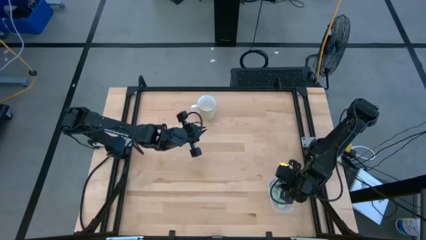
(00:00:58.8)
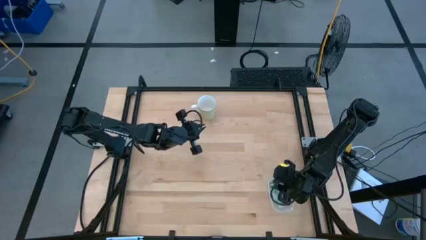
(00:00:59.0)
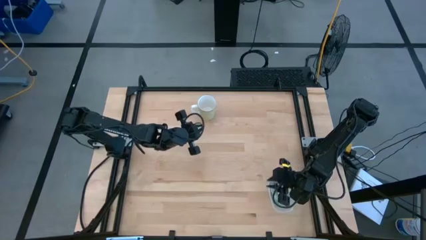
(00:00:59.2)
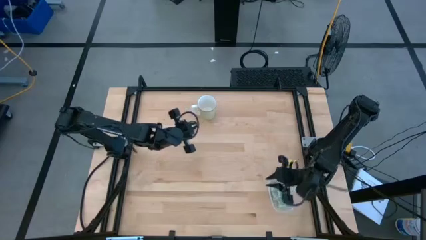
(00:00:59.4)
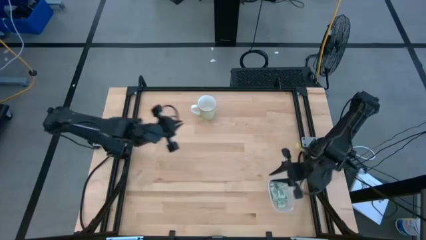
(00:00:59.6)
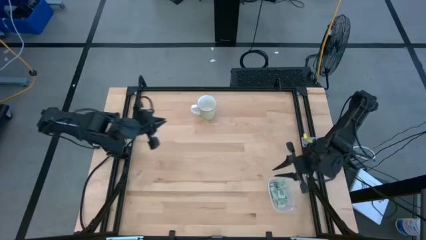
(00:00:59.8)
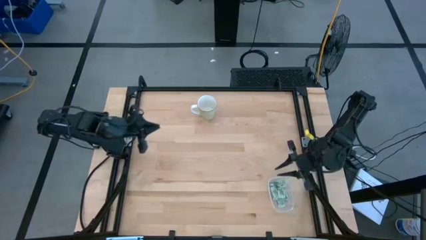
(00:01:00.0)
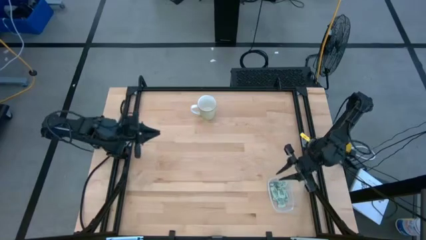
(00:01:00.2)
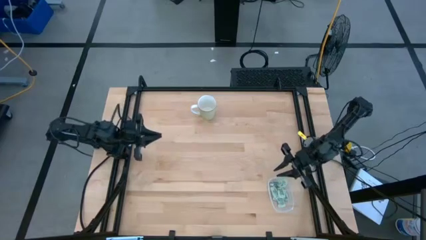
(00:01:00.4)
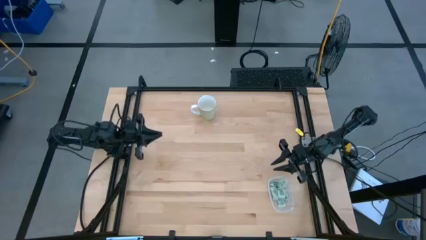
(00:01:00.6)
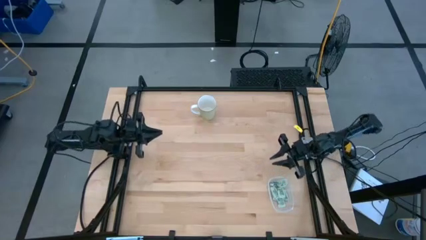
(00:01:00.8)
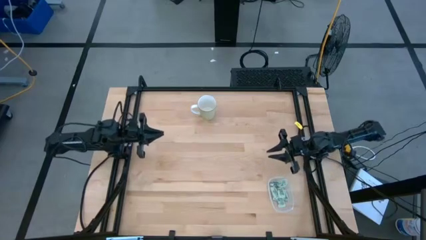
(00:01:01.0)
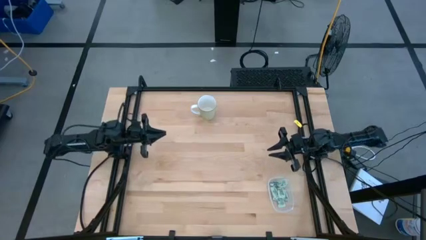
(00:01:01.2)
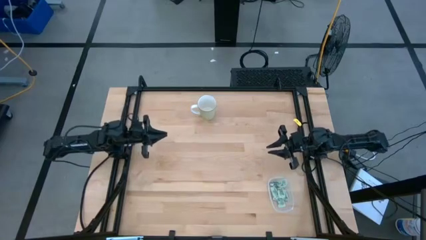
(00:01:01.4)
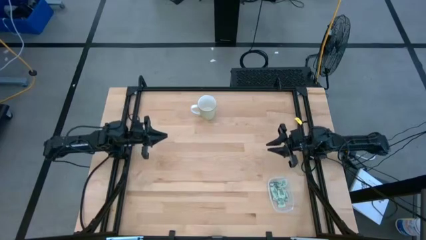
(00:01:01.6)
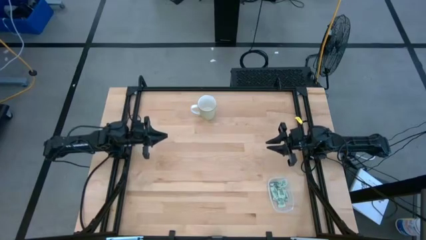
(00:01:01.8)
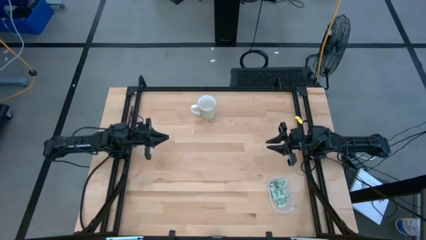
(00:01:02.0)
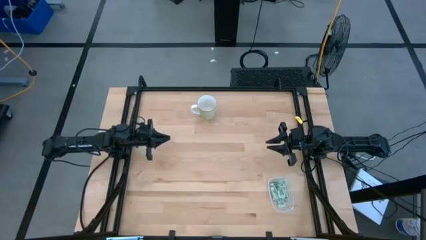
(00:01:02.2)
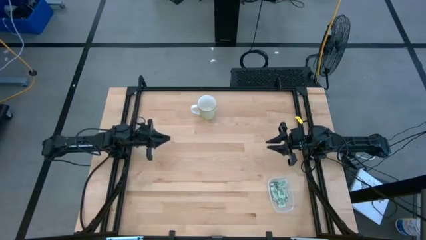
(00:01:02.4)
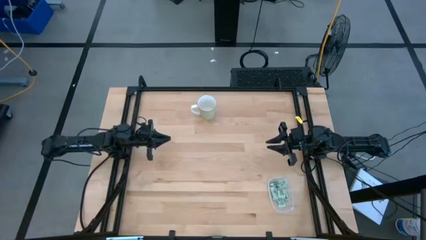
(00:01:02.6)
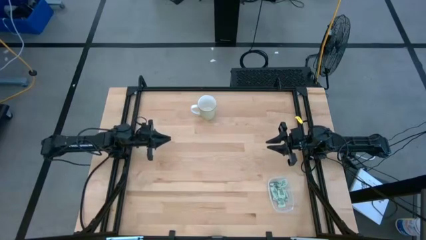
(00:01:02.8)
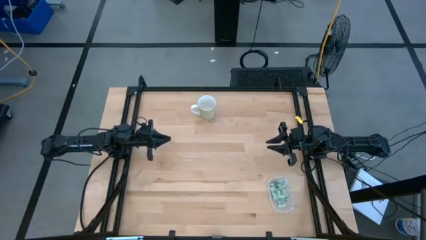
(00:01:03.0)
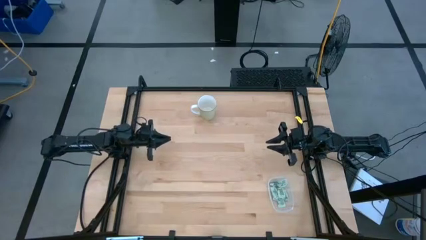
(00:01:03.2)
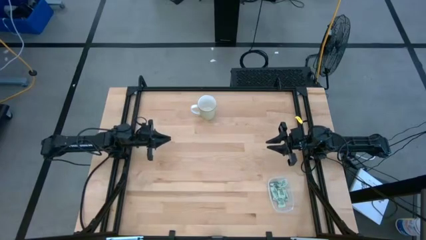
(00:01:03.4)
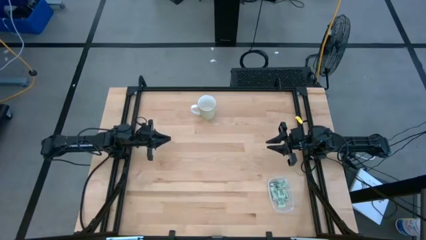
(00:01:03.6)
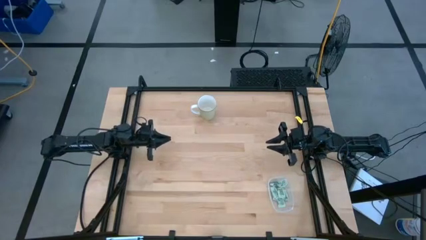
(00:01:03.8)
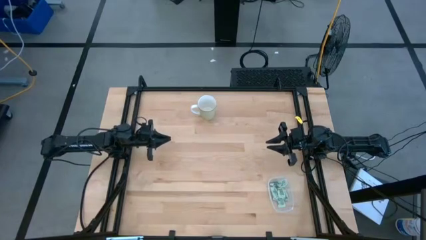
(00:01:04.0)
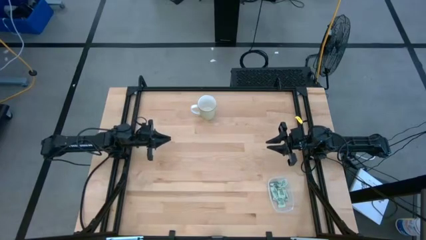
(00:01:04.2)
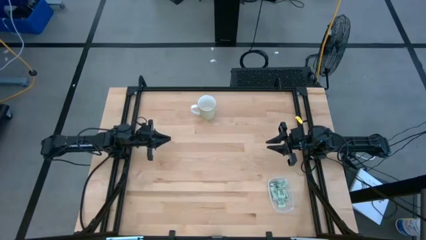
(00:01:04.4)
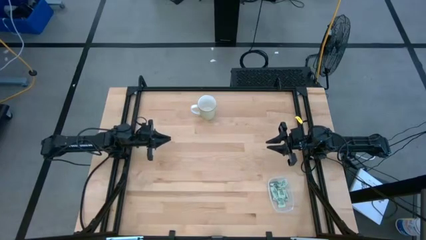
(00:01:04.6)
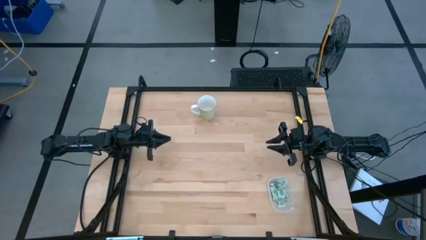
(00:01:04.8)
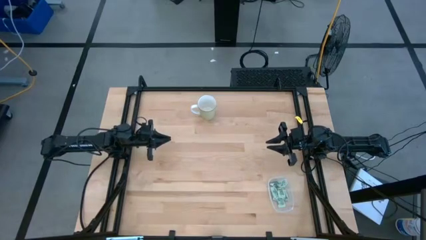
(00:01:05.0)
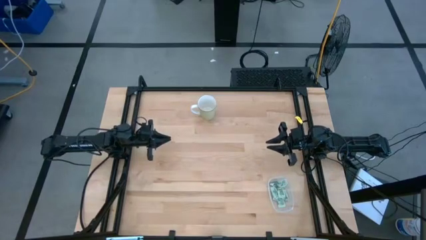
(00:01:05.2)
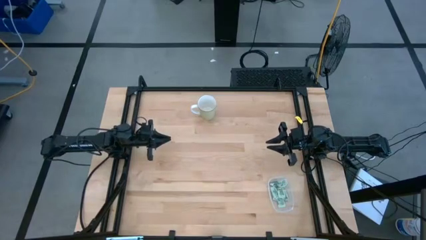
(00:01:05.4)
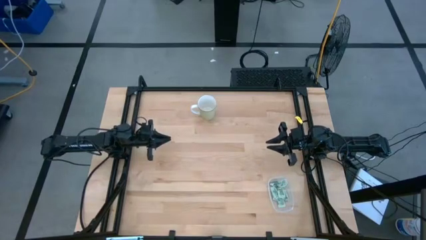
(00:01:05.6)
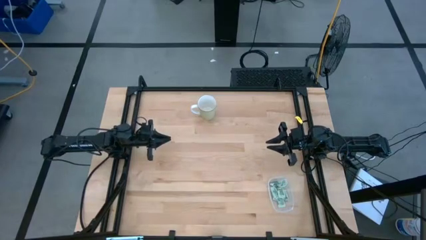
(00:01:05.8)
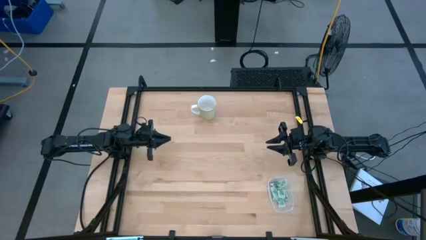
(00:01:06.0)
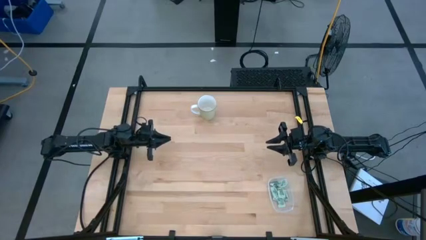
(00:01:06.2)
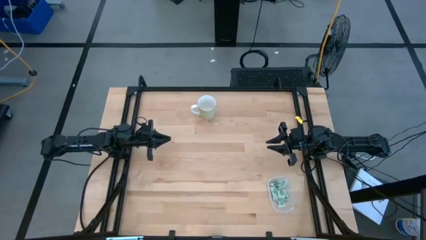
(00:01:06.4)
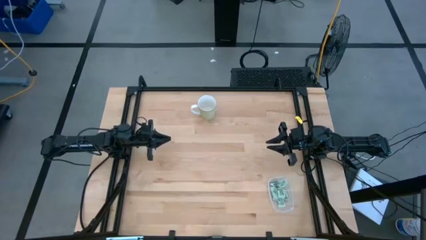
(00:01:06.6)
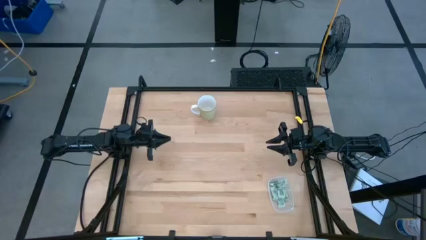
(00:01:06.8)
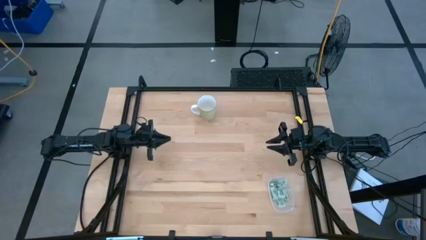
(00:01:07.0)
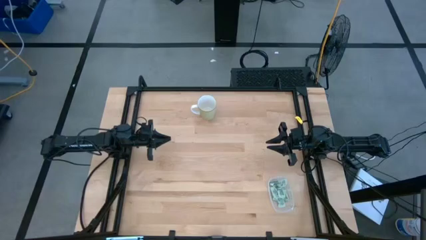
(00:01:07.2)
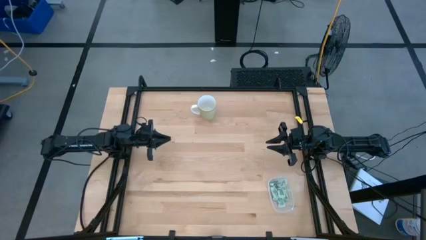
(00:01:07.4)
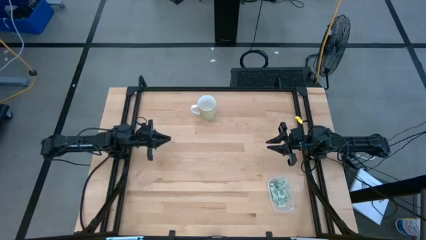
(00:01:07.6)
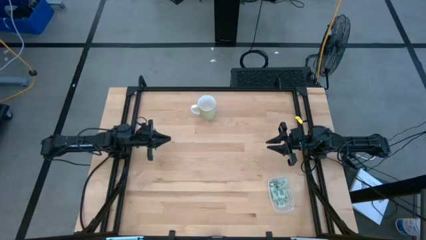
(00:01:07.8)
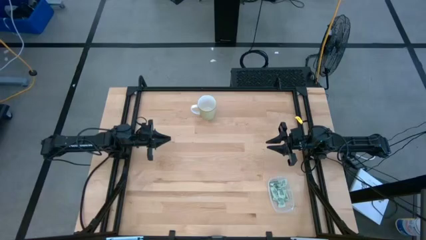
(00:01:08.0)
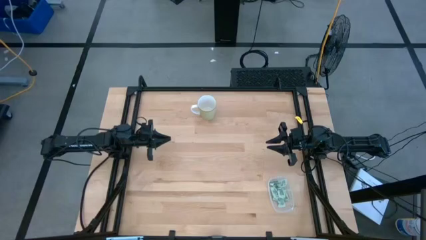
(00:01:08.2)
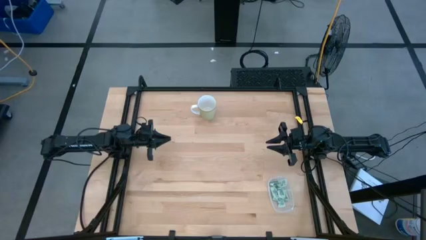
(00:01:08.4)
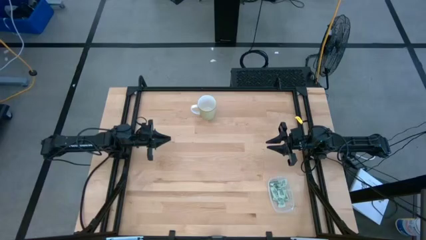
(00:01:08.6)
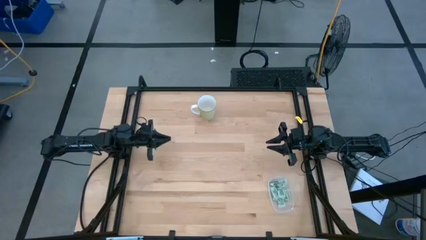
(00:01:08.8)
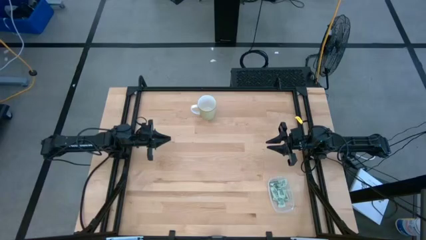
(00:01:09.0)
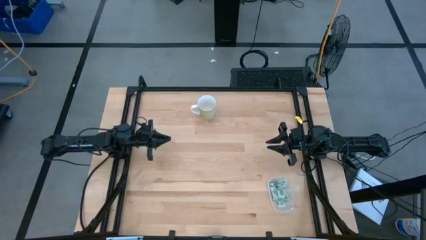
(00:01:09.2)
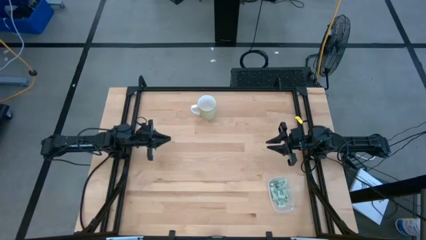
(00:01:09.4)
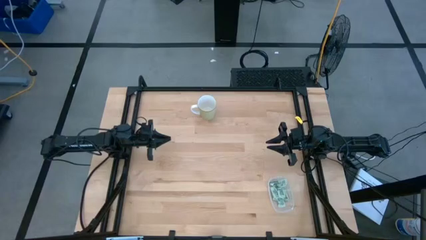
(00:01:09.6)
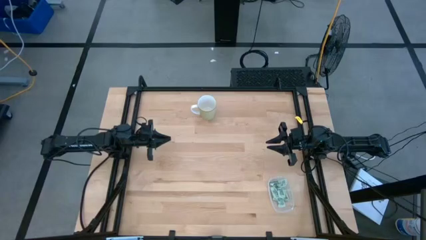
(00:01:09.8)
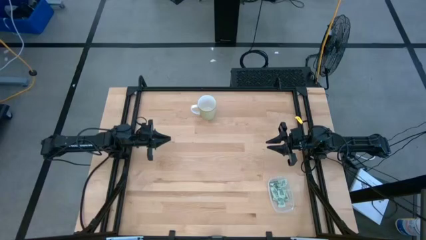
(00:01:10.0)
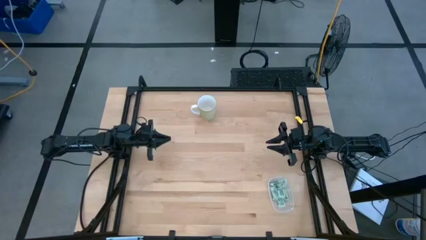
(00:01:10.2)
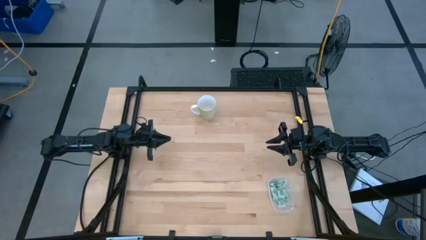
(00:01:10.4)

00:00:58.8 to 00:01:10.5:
Task: Pick and place Stevia / Truvia into bins
Return to Home Position

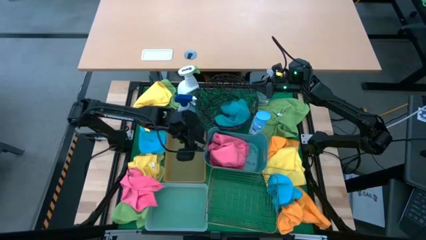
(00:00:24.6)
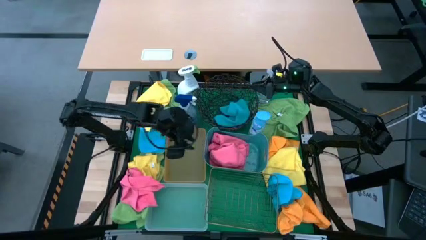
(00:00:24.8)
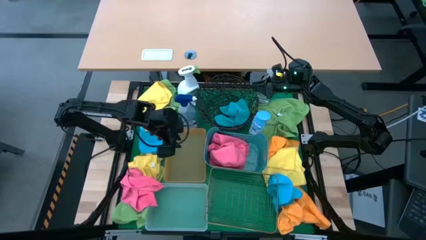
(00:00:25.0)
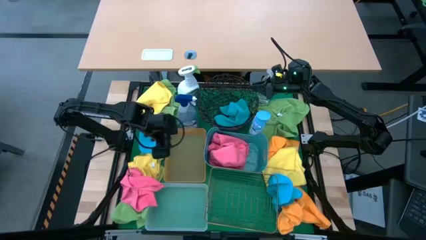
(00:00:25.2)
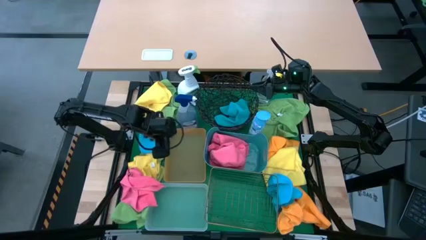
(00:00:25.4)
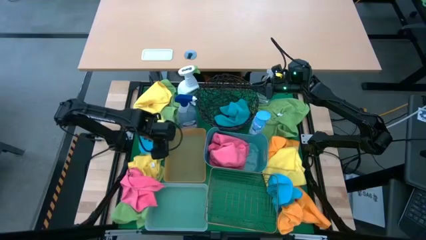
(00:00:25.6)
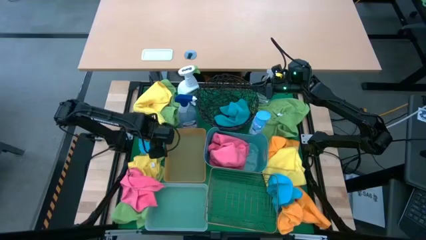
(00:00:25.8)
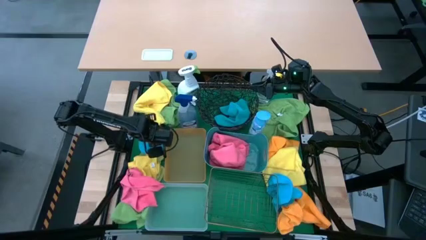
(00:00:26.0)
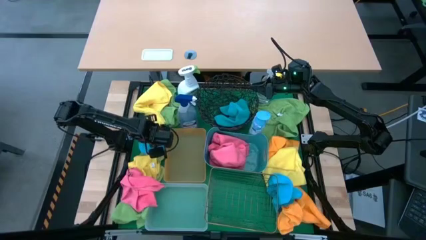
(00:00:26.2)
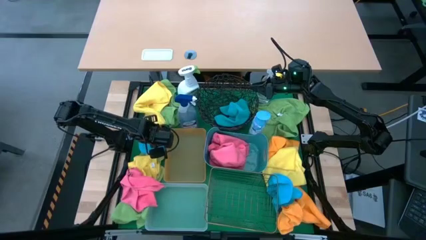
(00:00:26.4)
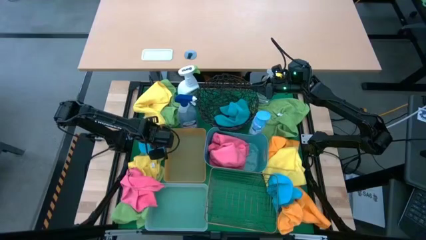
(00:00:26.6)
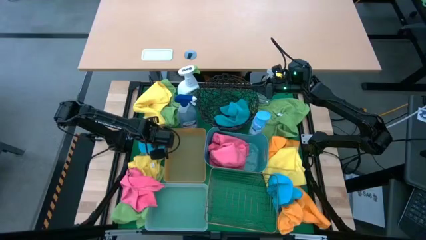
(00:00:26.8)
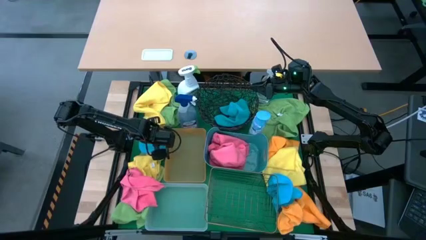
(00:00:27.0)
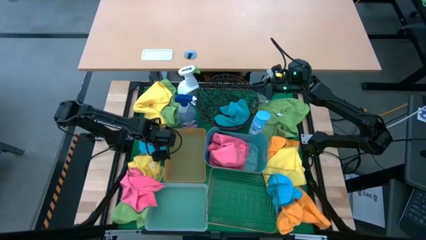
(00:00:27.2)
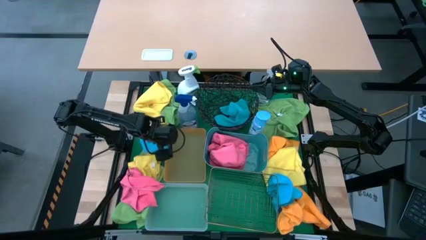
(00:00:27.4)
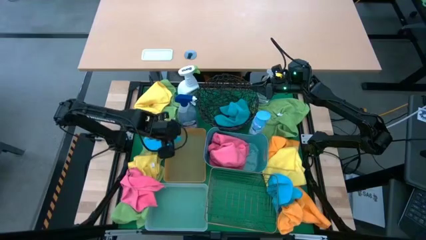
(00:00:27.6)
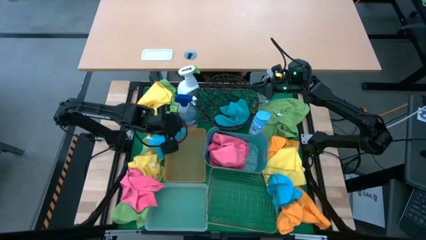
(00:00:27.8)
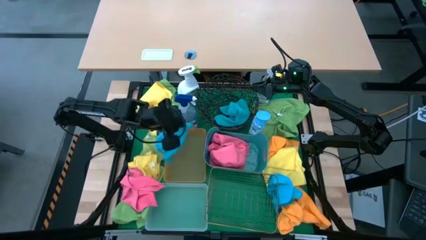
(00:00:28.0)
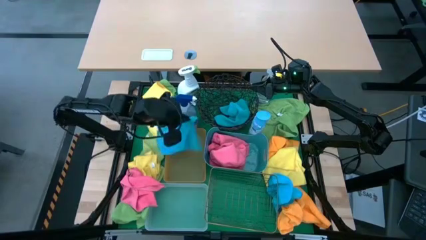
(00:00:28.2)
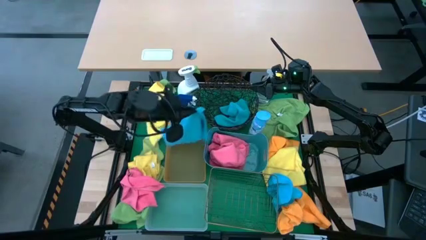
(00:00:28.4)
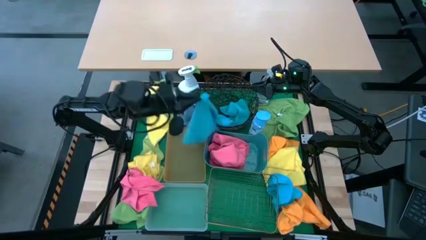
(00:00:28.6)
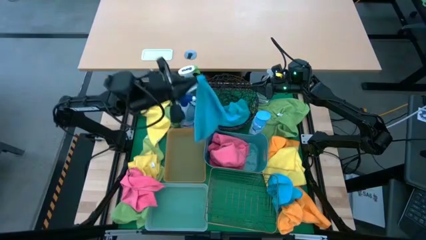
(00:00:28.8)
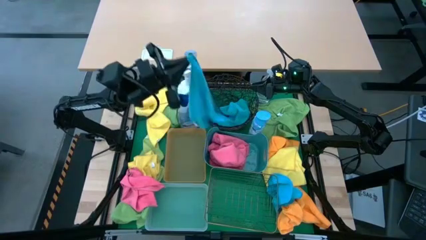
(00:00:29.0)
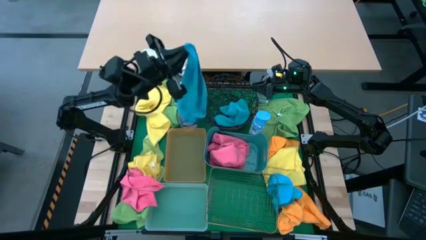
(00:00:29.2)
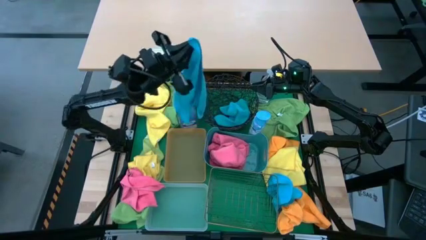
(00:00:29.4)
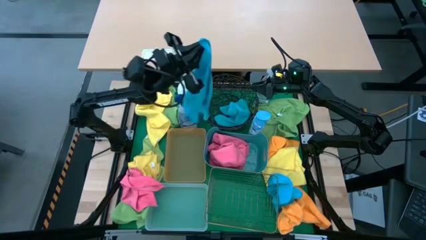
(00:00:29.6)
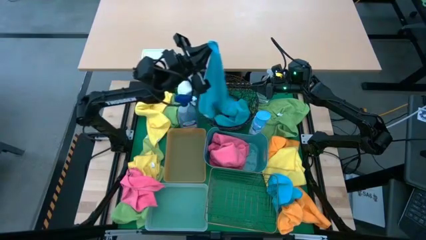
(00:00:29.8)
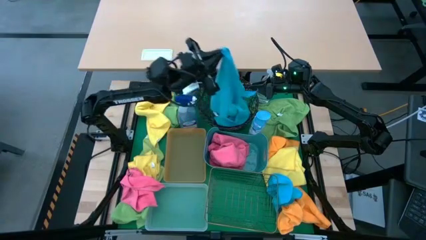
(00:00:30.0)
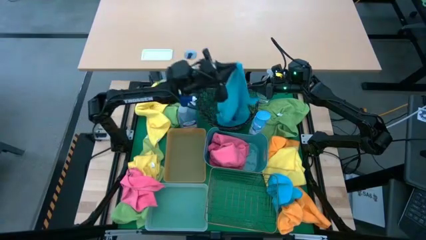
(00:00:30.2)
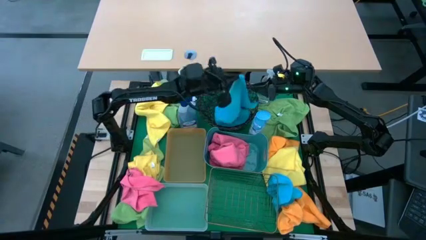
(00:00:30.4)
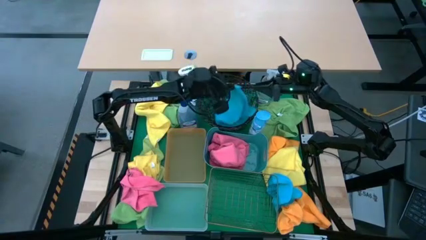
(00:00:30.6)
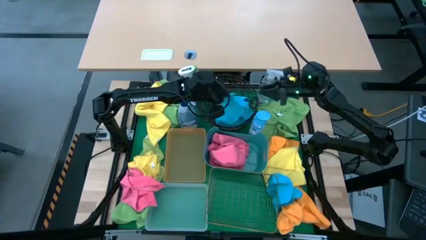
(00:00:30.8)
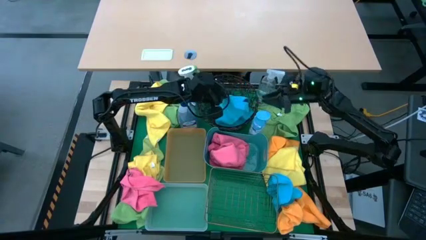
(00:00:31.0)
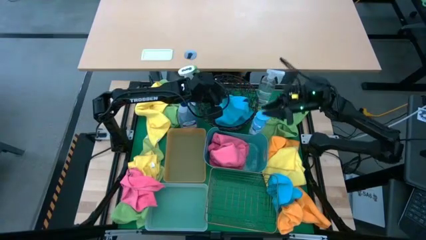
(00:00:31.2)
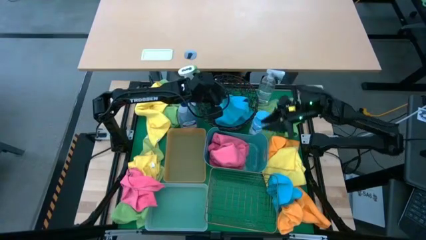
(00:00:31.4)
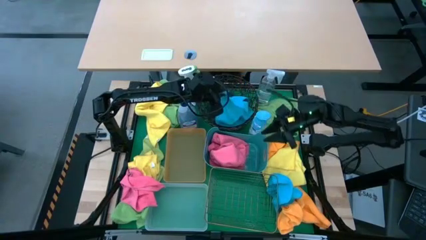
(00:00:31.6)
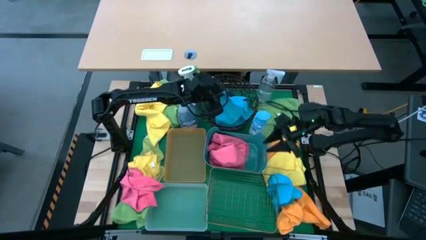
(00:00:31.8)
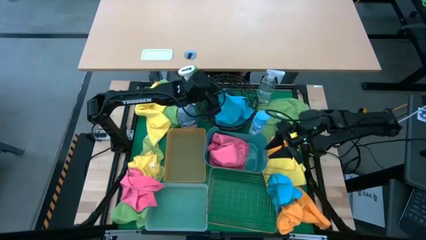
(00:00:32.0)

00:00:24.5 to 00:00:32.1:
Task: Sort microfiber towel by color & place in baskets
Put the left blue towel into the black circular wire basket
